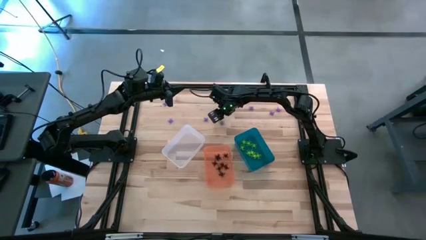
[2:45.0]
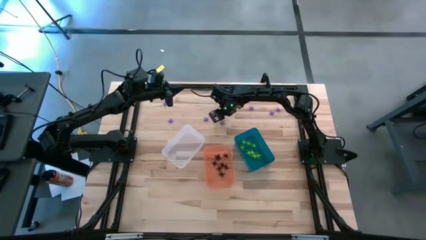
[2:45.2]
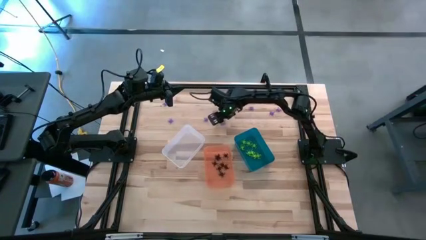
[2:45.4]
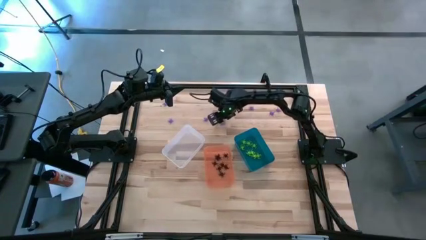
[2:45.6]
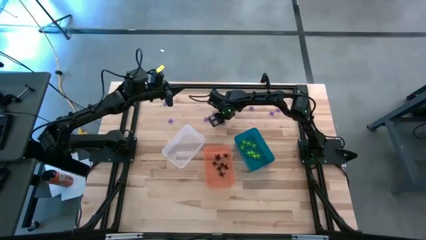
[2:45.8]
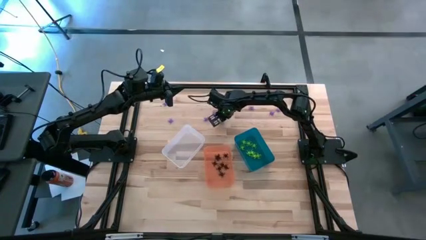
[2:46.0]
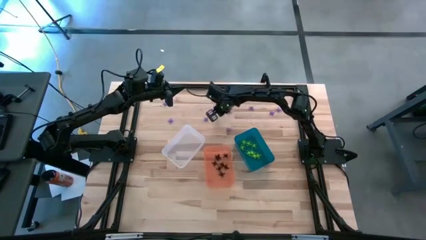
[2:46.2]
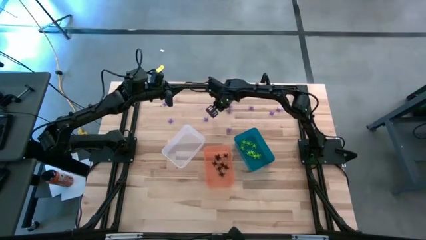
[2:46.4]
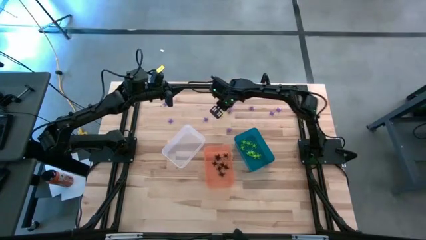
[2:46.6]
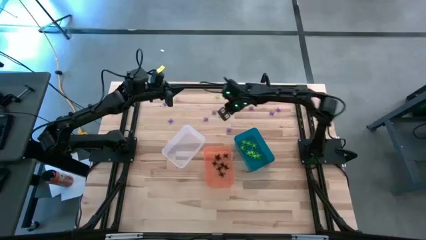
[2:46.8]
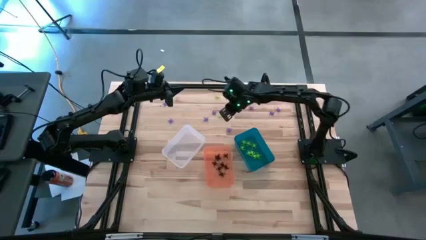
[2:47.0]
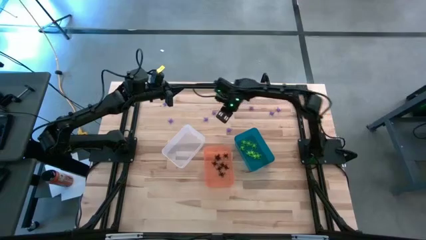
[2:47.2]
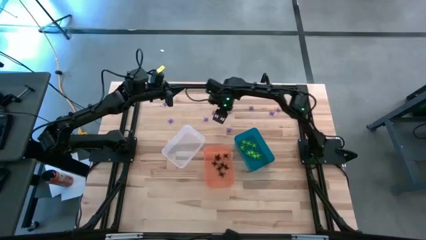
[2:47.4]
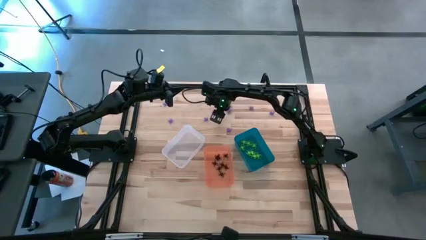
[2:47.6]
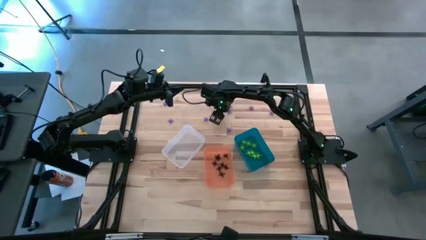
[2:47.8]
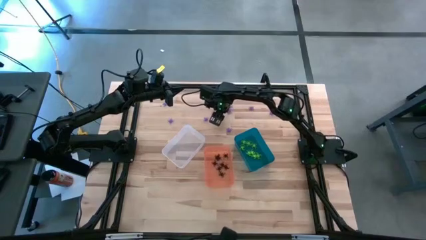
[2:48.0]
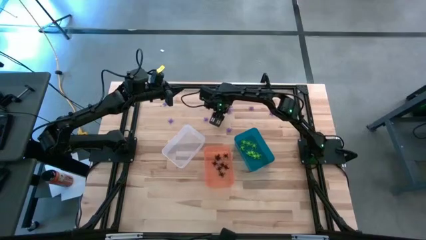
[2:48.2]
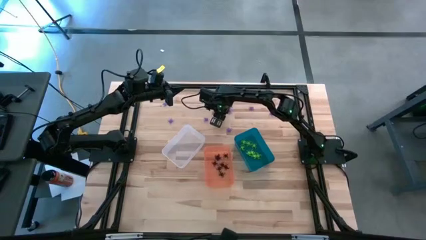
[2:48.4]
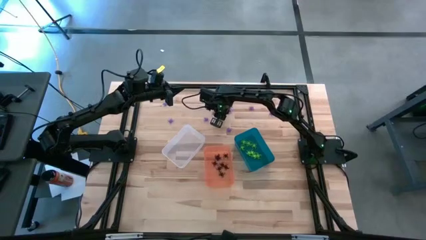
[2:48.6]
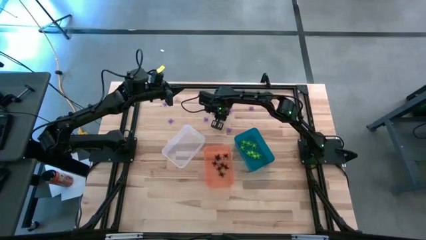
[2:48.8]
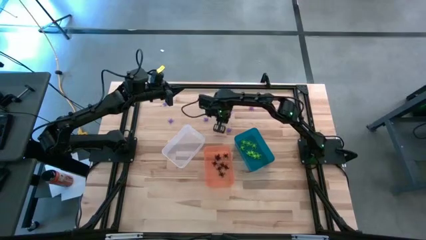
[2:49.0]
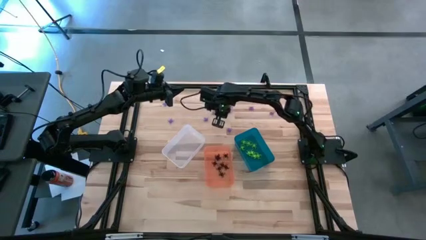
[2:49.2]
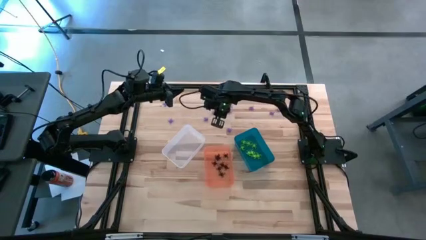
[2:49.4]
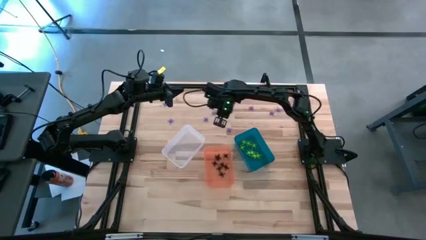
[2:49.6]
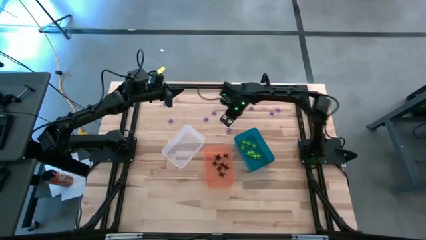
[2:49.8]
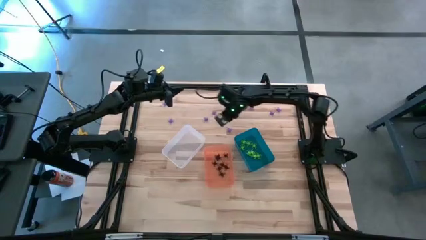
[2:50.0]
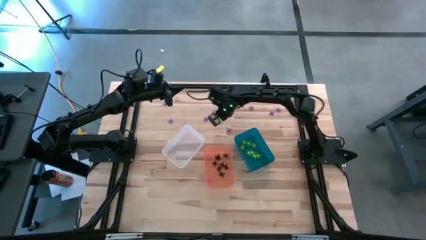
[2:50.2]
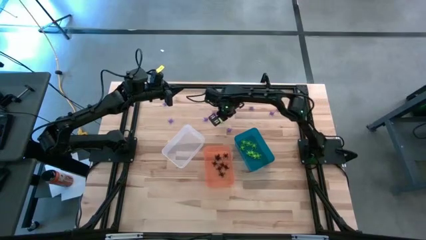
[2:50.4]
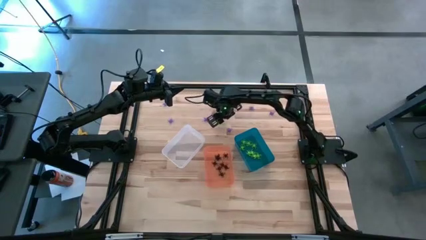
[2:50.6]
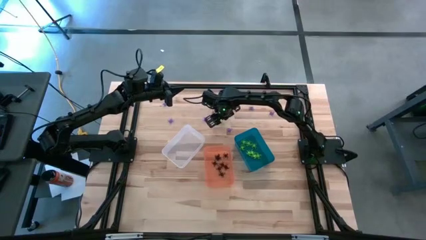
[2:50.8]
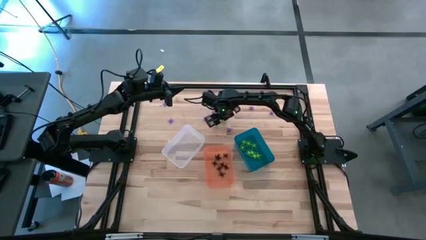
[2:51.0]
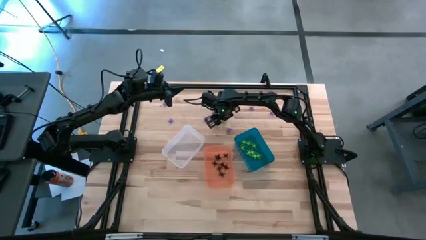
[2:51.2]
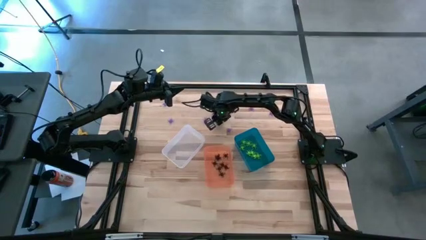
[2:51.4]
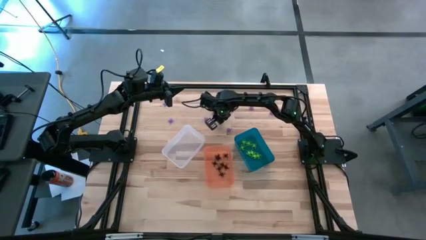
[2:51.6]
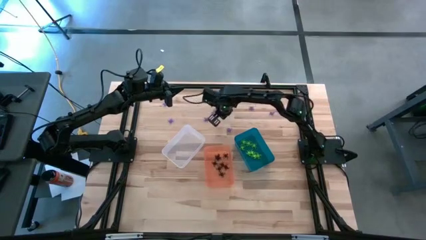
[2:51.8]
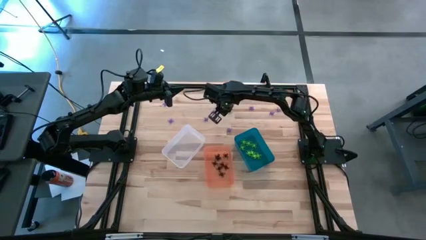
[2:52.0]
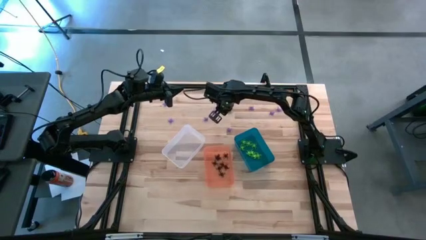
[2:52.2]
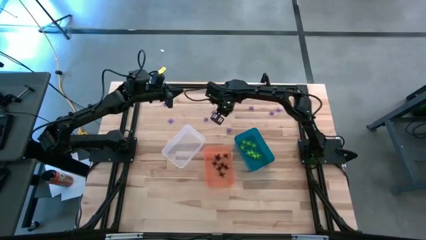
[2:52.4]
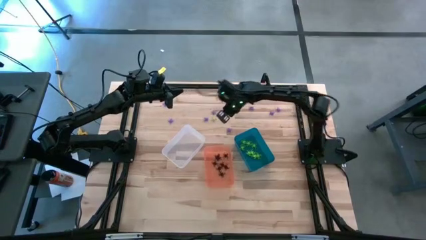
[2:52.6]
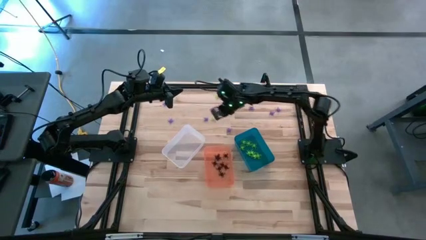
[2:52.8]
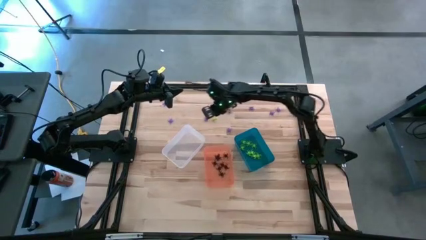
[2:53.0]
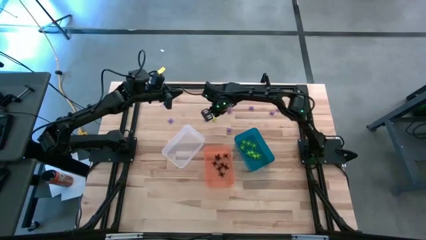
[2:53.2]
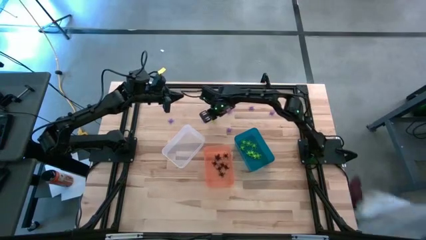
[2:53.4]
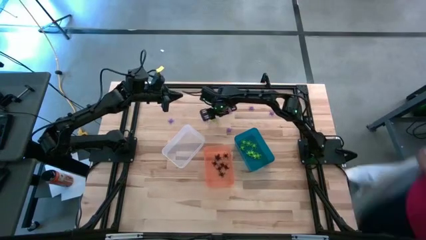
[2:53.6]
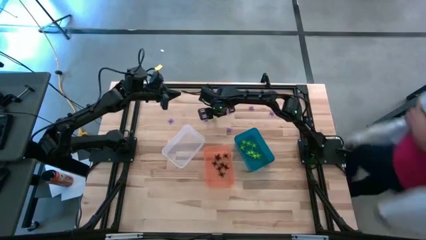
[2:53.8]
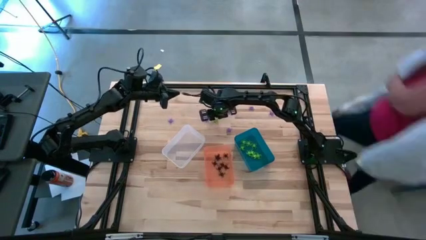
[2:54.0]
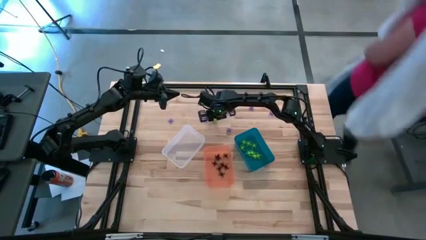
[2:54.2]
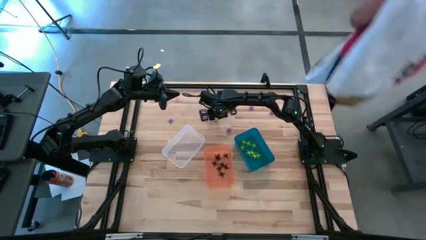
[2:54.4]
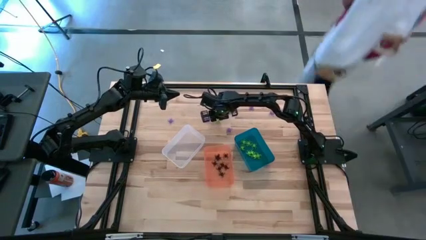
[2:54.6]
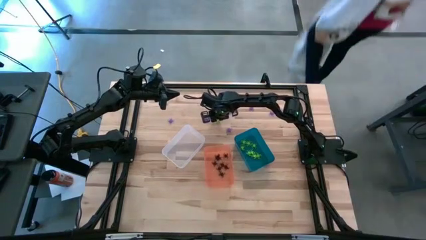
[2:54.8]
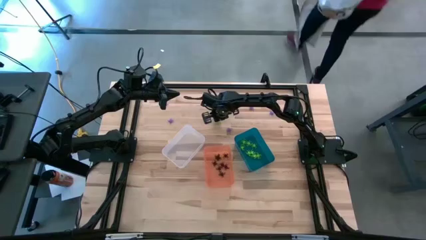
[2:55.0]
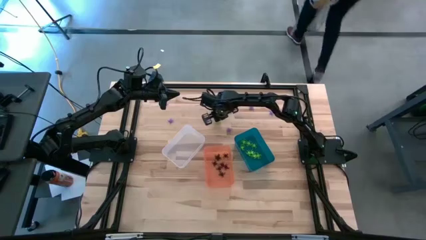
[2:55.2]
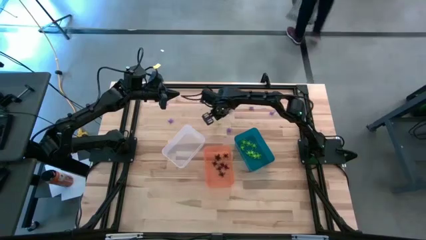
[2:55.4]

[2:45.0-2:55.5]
Task: Sort Halloween decoration
Put the green spider toy into the blue bin

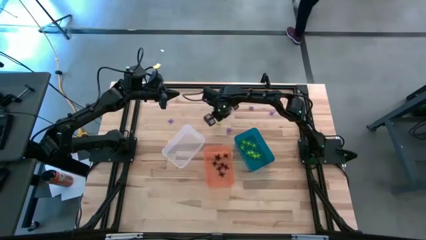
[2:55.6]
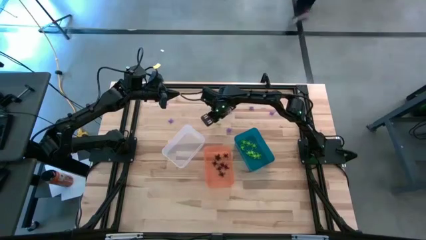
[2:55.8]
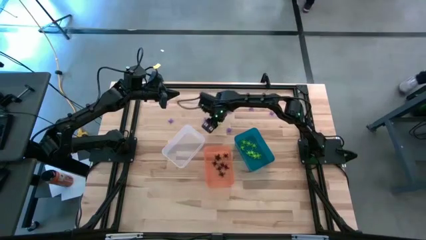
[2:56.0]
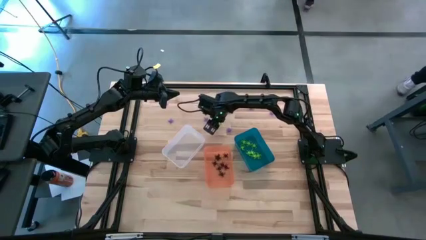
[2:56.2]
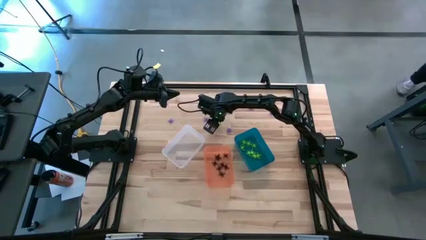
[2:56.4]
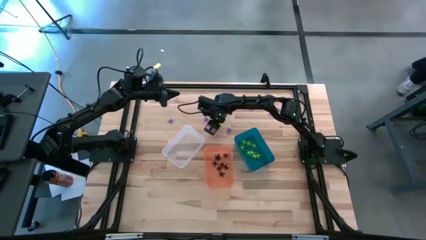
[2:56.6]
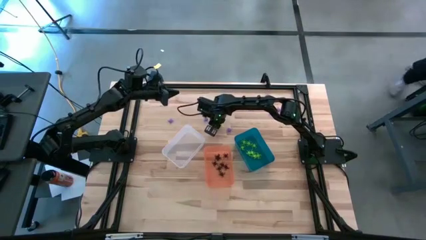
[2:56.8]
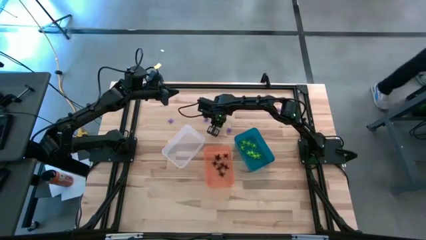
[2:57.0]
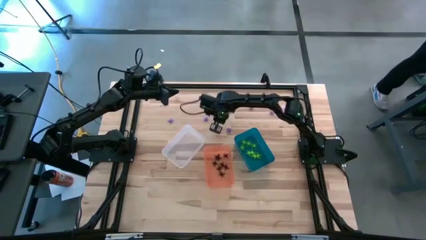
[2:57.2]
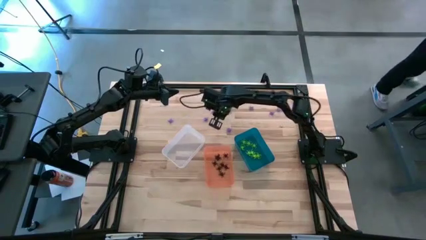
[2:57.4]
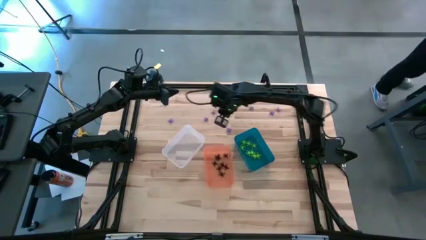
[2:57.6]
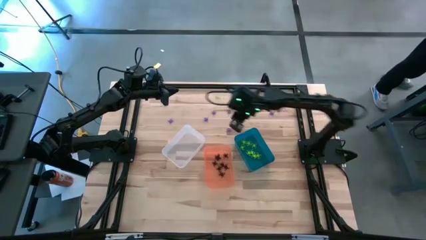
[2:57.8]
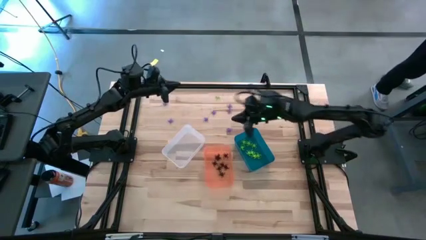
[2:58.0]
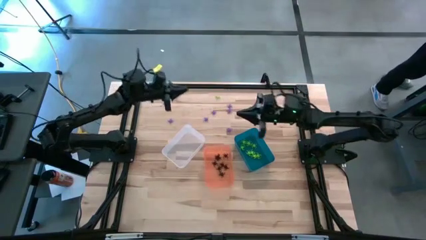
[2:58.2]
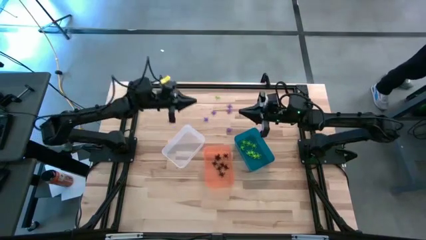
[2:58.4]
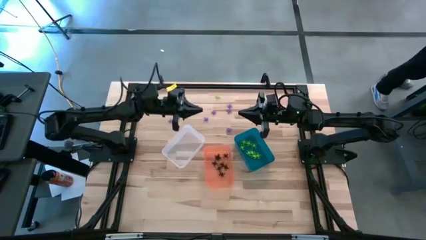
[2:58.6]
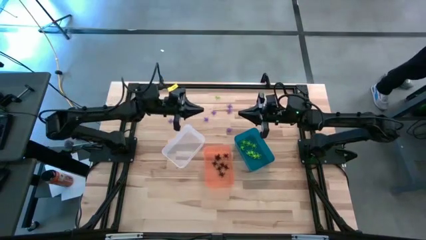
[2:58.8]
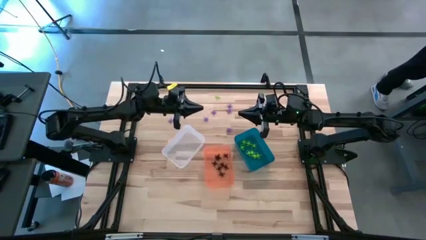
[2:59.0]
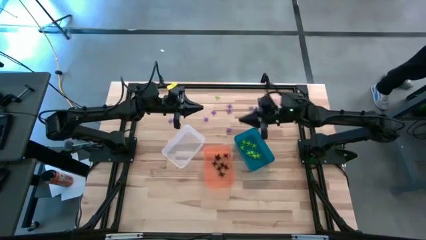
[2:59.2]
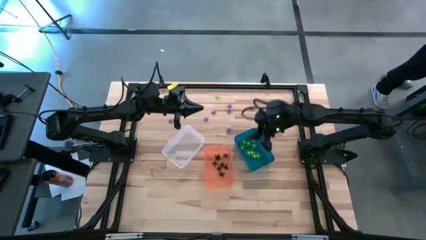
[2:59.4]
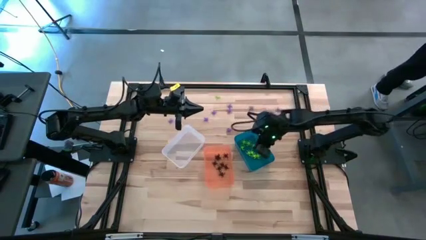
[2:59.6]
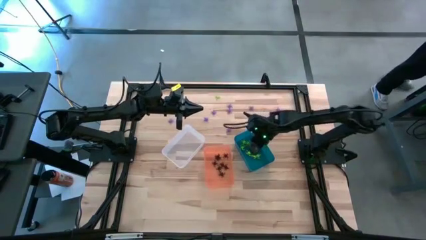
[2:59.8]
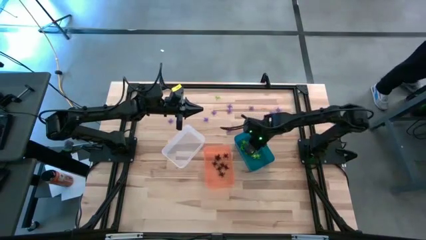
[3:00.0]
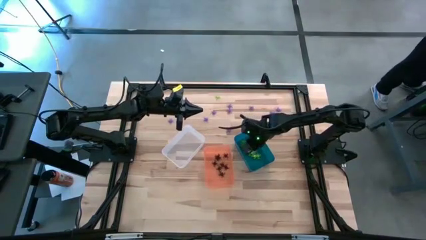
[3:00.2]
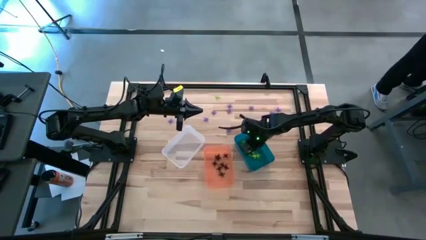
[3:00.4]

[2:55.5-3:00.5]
Put the green spider toy into the blue bin
